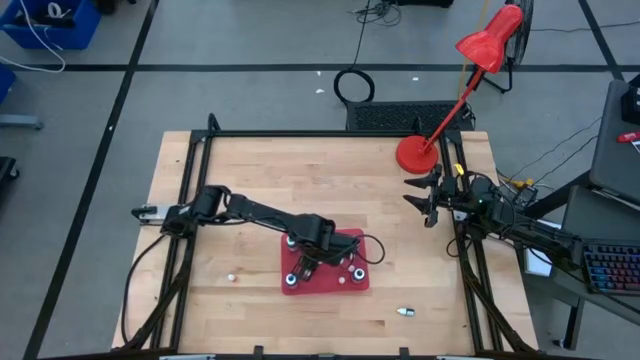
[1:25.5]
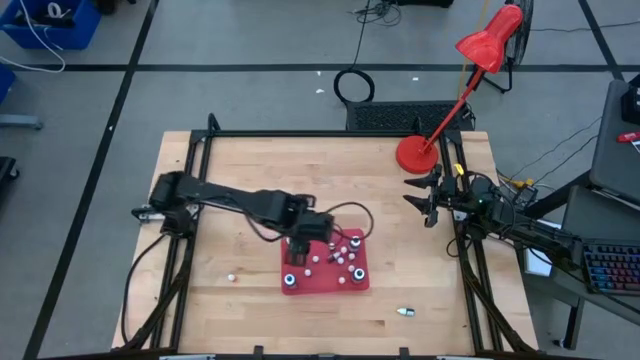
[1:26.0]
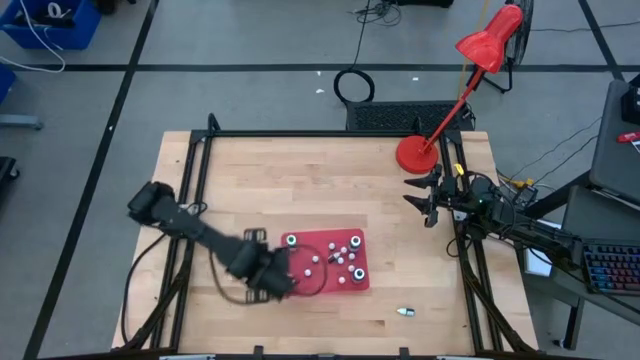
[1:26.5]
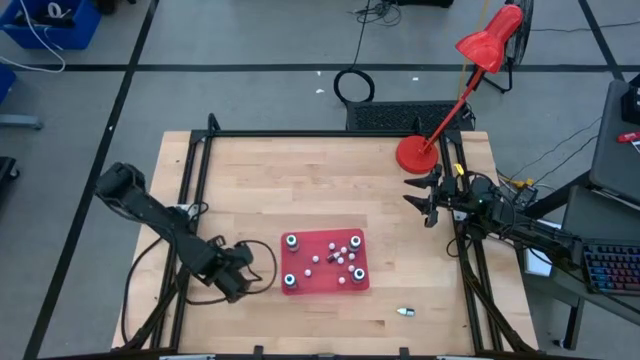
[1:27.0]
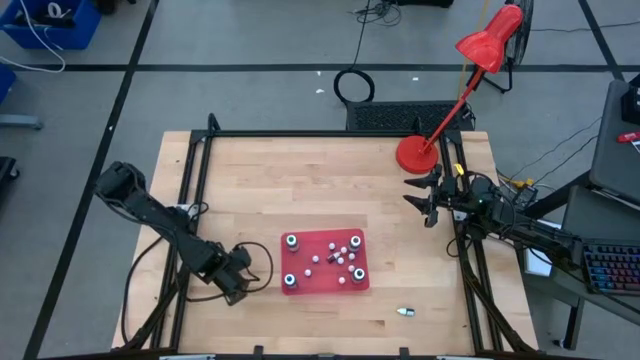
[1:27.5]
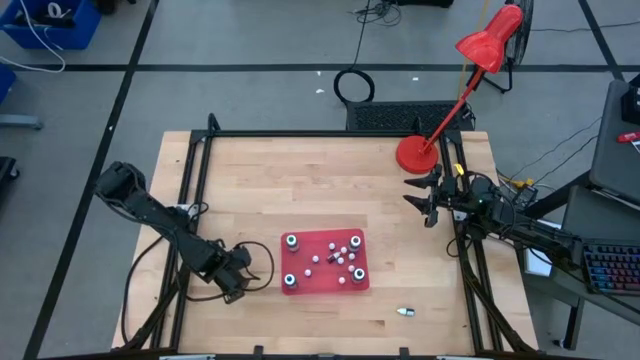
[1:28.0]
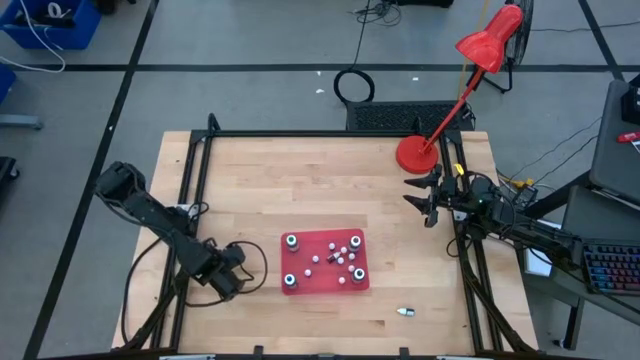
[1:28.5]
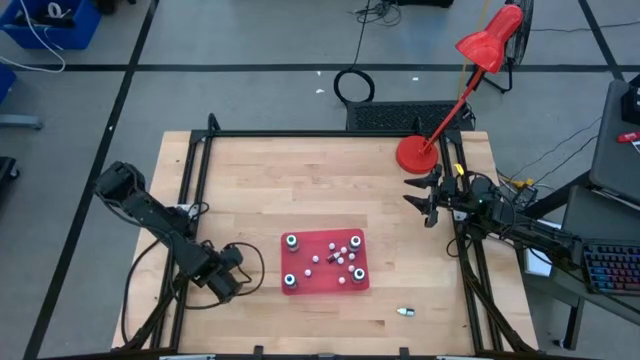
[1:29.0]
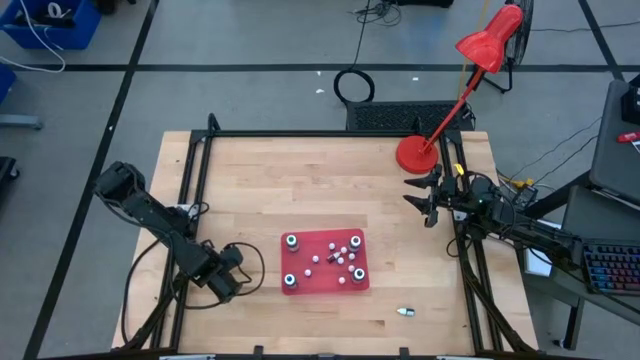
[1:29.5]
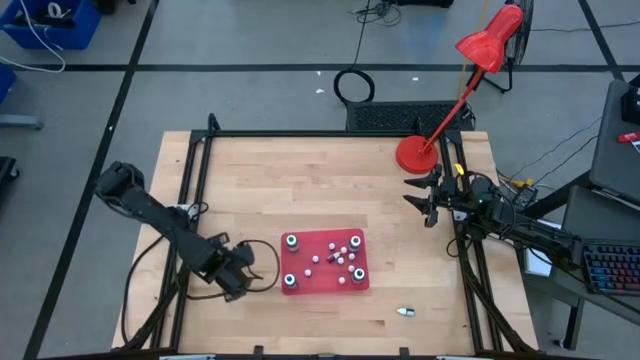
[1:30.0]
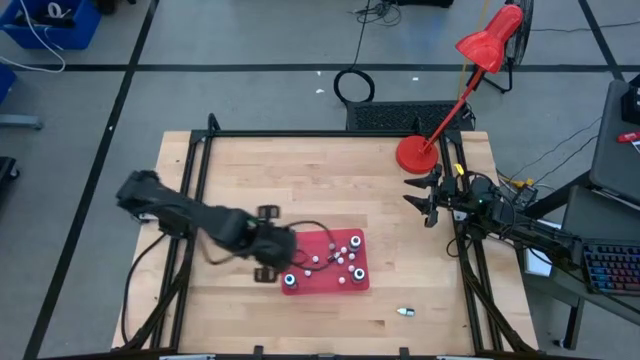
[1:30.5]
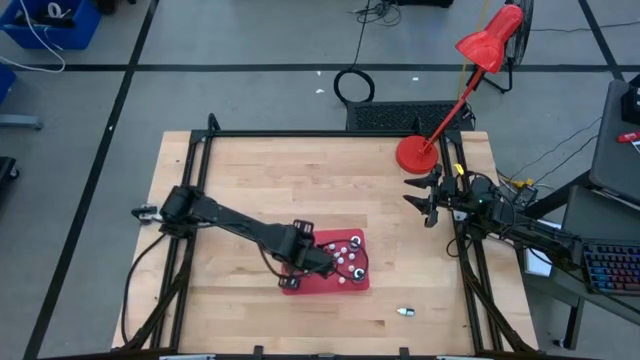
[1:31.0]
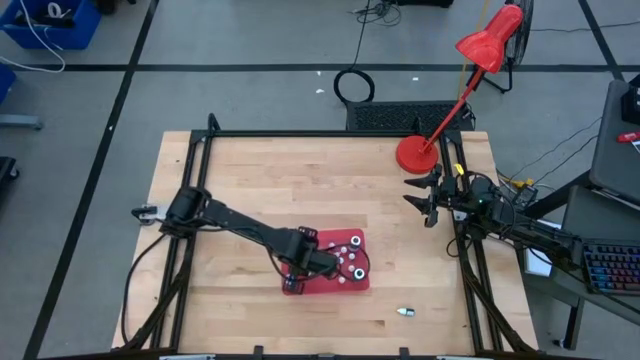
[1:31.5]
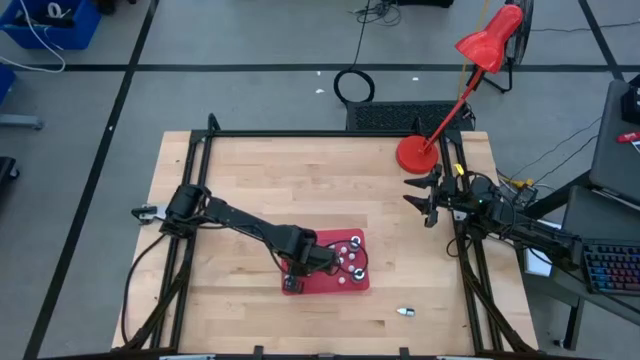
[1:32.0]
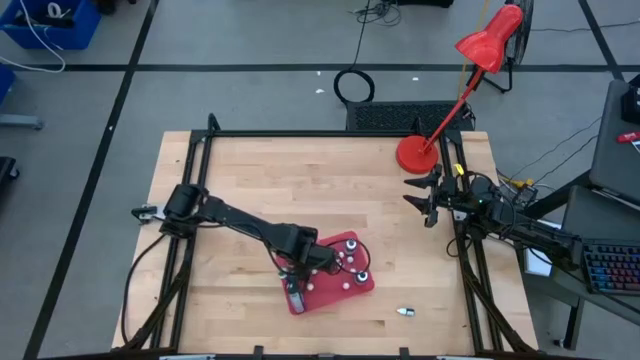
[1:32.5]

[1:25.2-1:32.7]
Task: Pick & Place food coloring
Put the small orange food coloring bottle into the pink bin

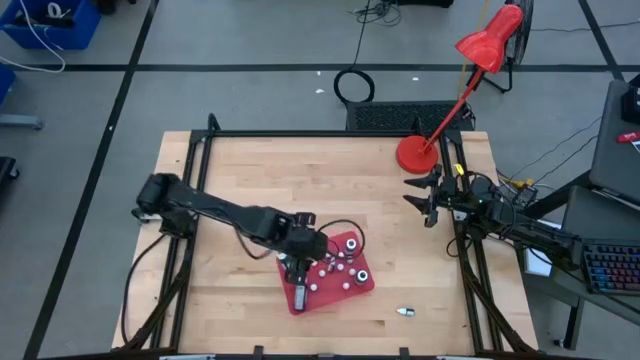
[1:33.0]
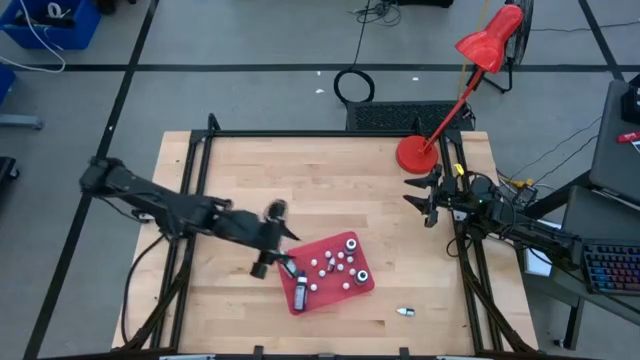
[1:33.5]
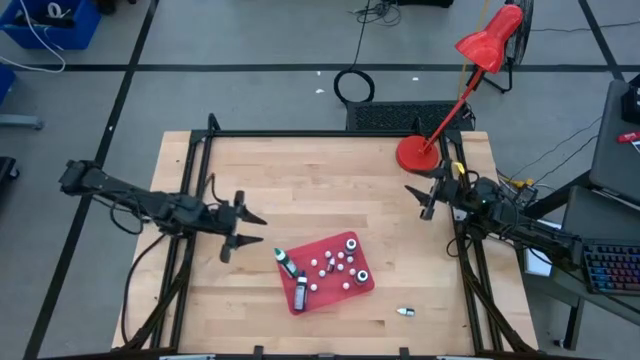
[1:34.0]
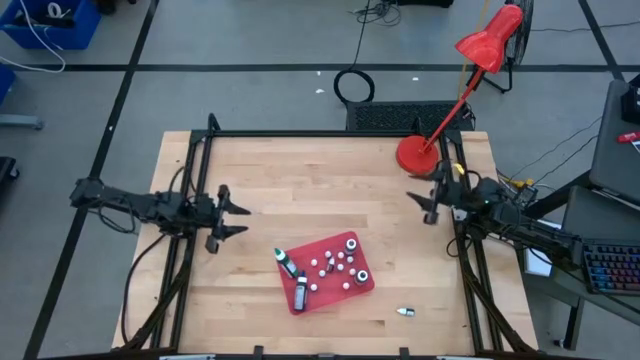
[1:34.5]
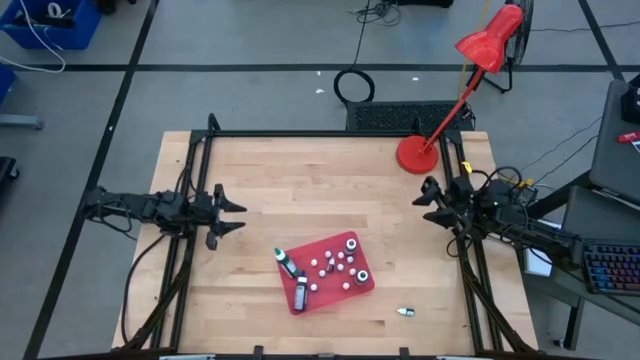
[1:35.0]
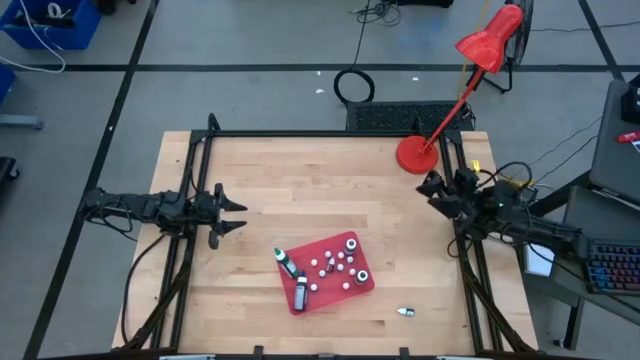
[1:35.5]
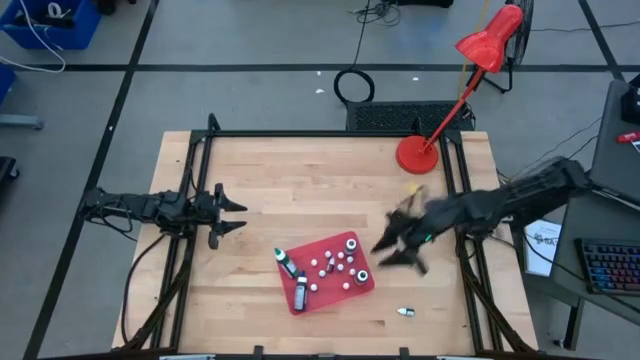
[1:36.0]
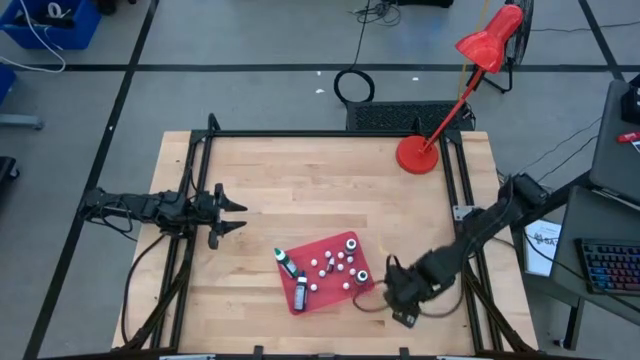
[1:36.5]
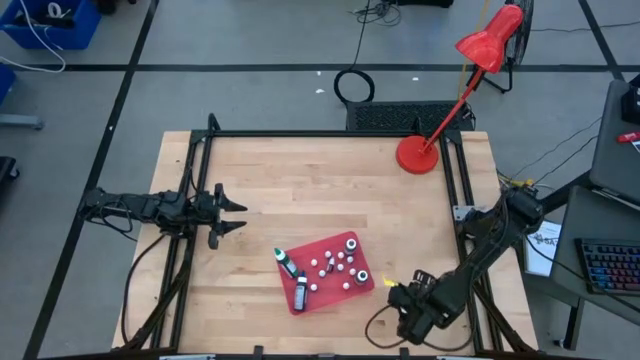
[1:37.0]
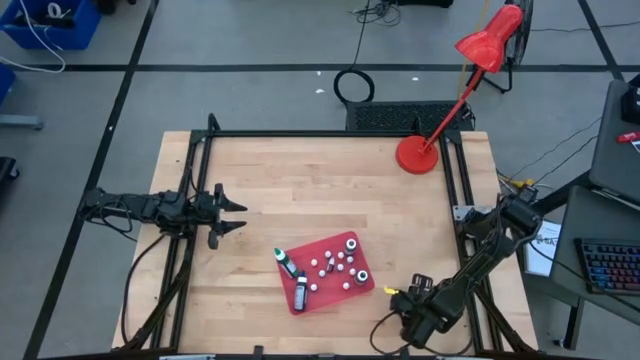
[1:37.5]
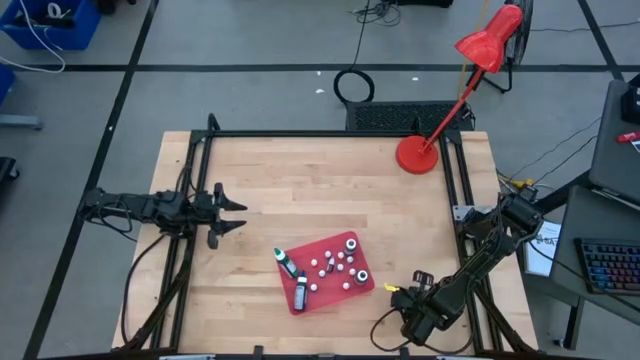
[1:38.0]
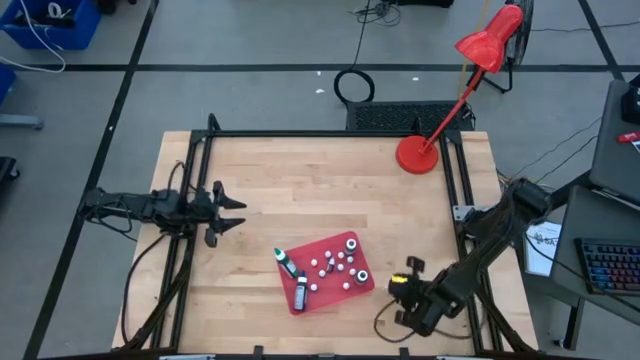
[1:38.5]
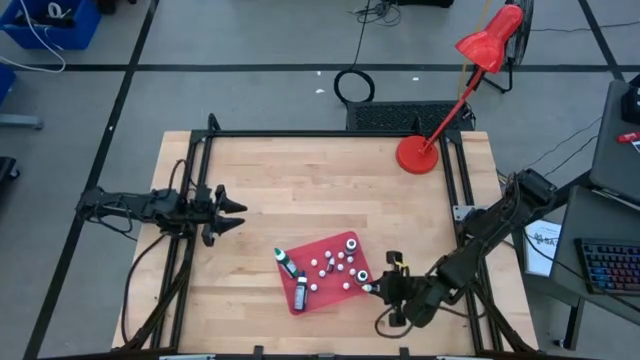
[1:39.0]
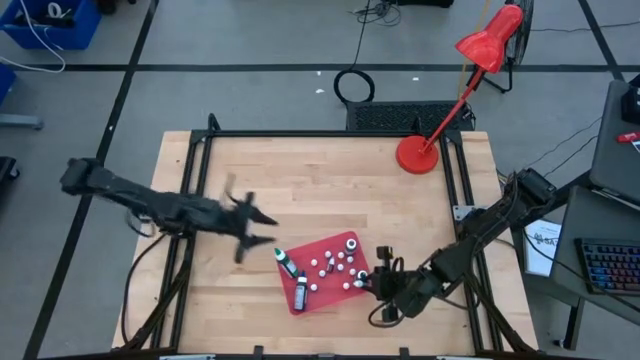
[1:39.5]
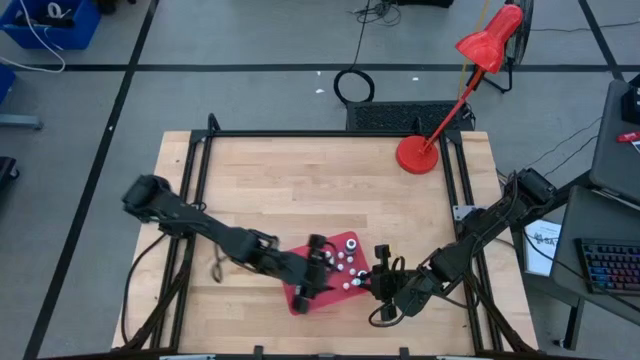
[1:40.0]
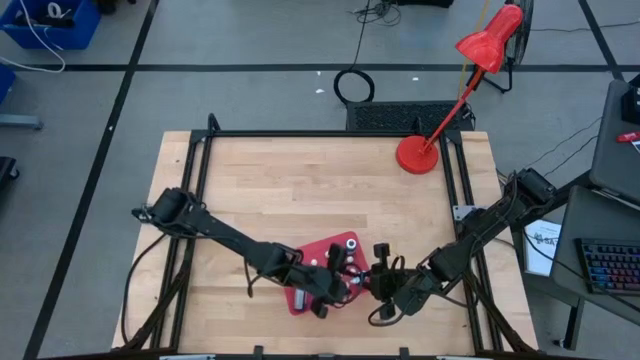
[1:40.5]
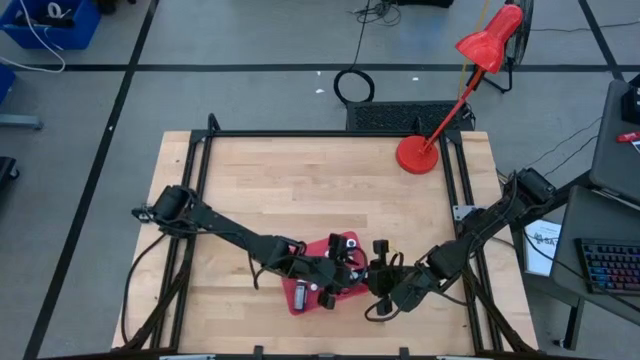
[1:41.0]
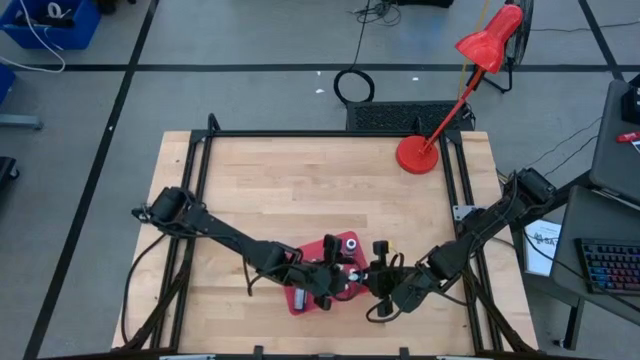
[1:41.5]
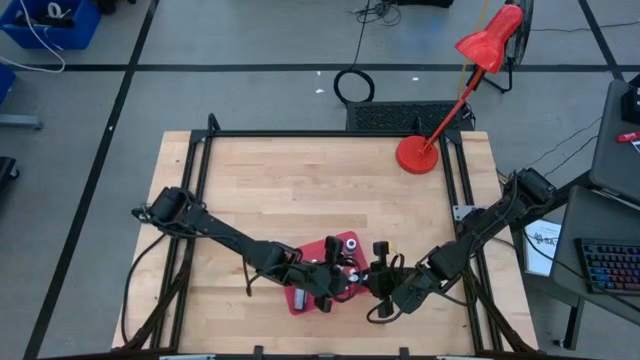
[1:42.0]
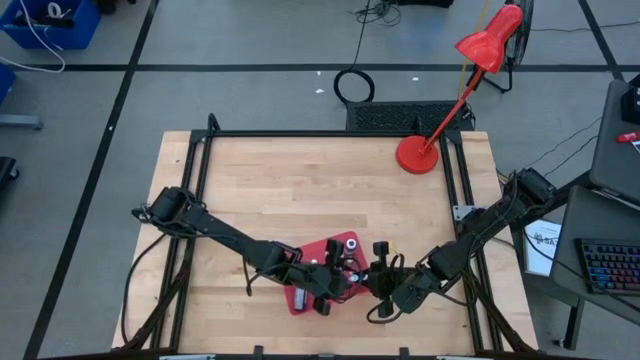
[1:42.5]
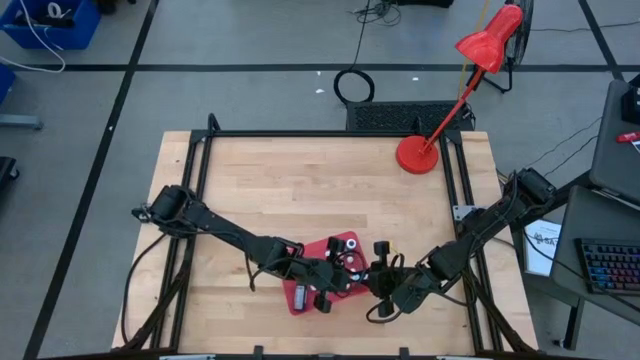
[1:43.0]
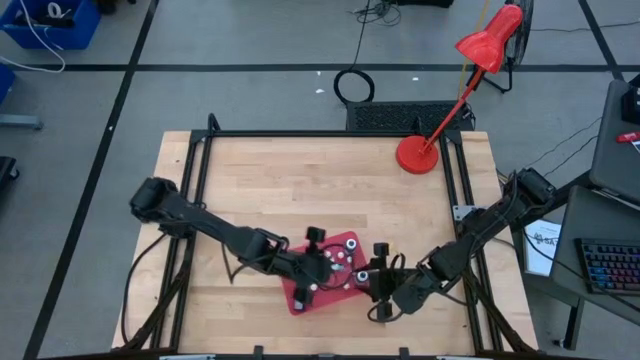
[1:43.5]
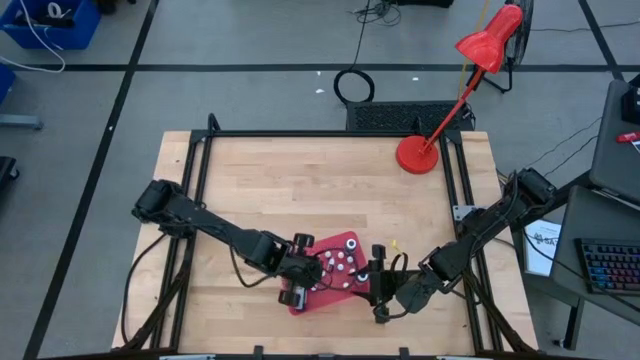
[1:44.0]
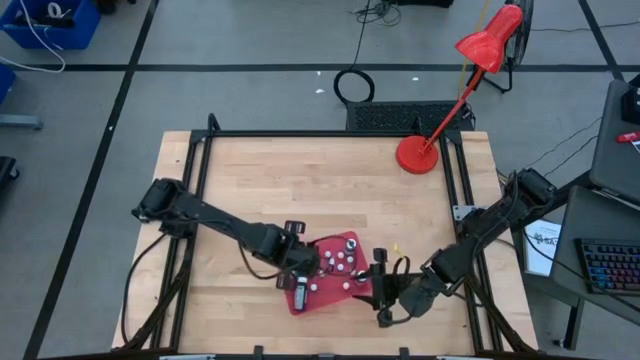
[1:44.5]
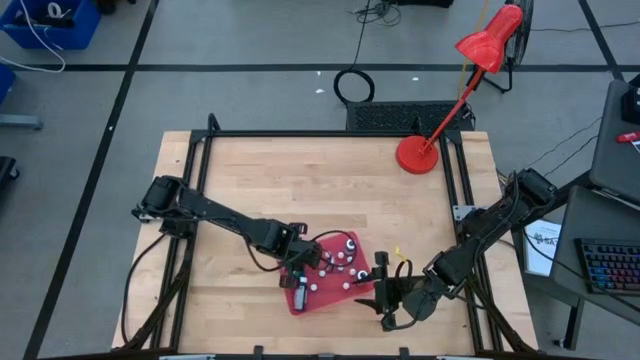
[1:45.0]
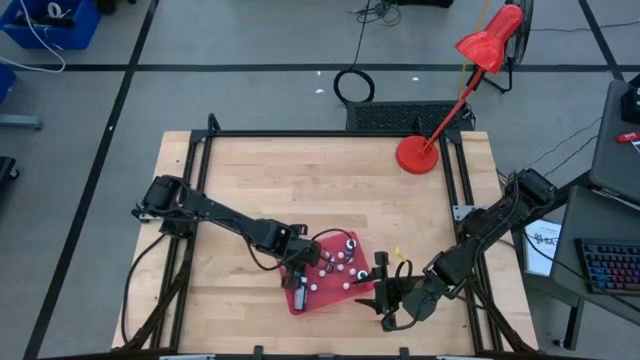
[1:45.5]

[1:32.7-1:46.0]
Put the small black food coloring bottle into the pink bin

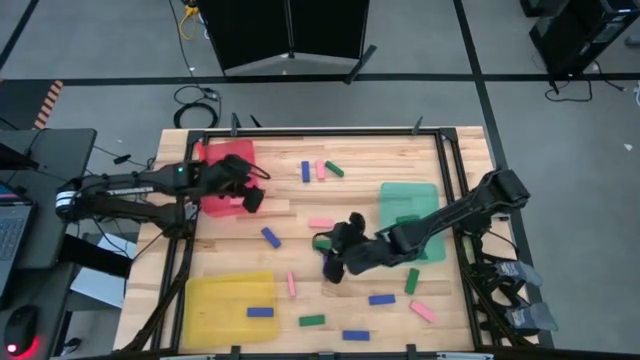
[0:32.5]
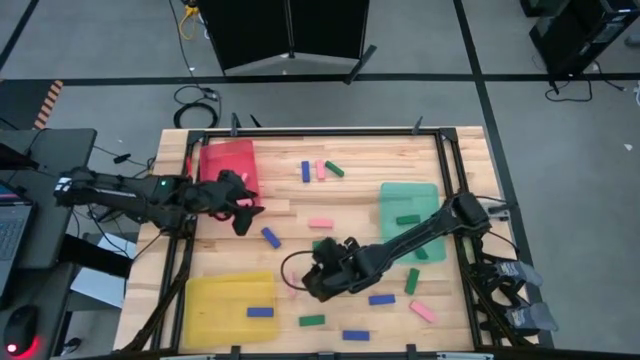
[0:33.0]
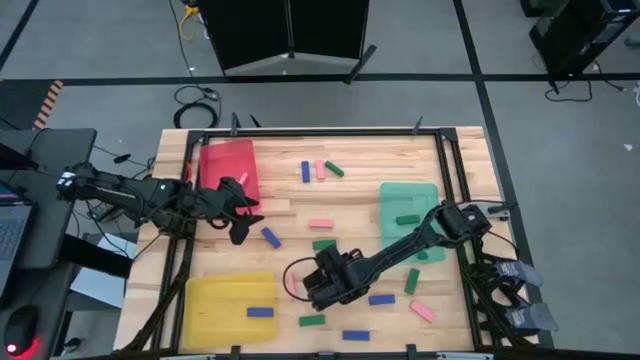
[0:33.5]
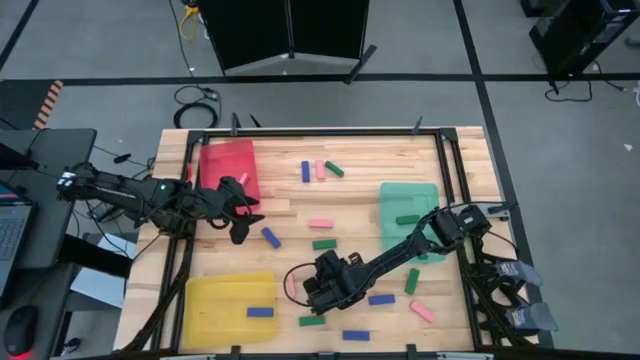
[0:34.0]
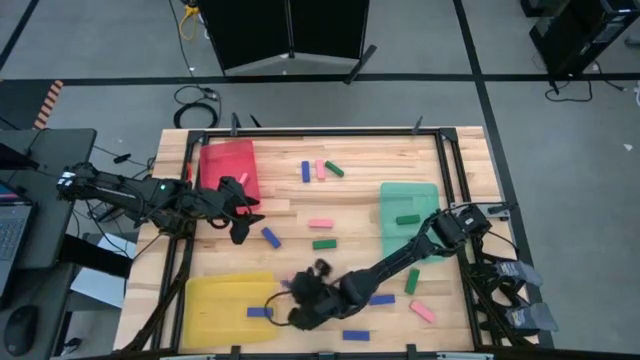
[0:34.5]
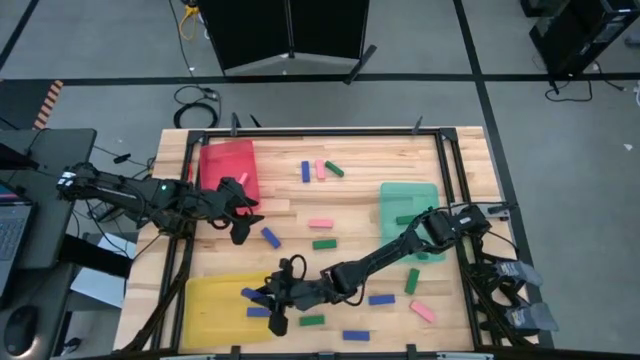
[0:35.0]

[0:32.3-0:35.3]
Task: Sort blocks
Put the blue block into the yellow bin
